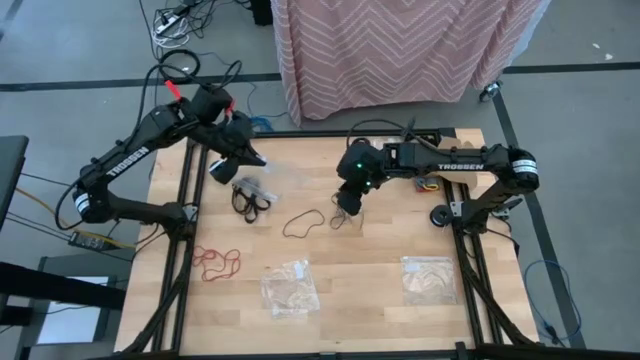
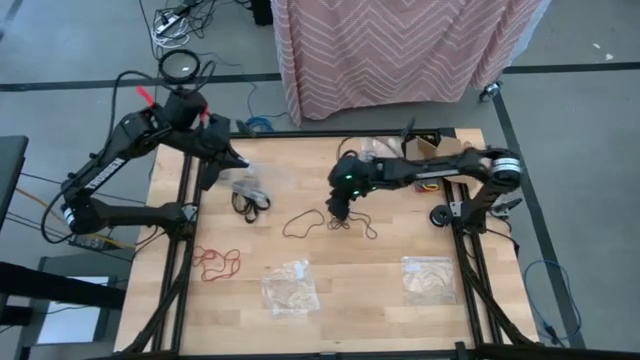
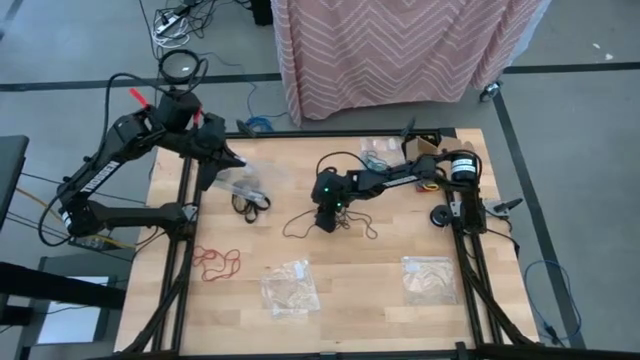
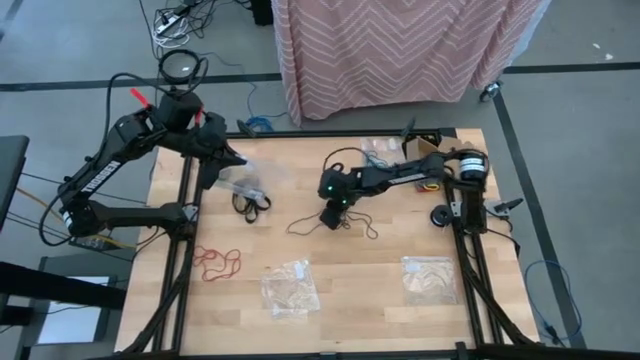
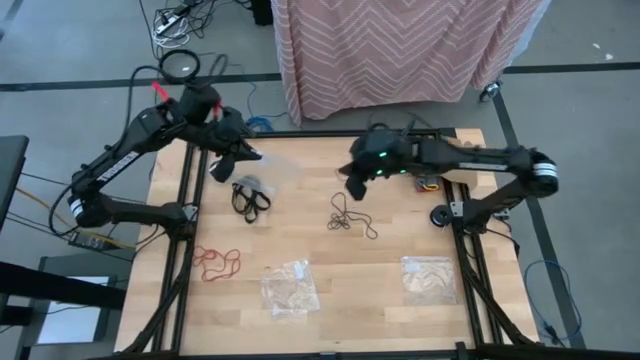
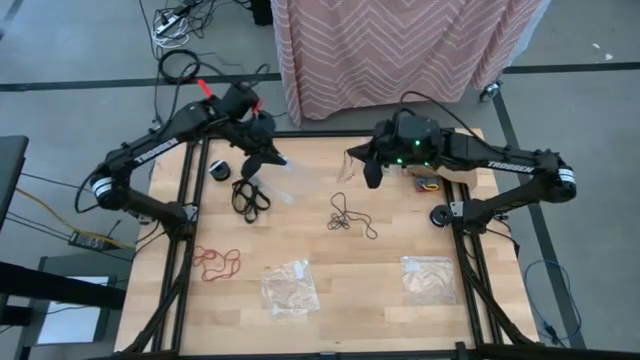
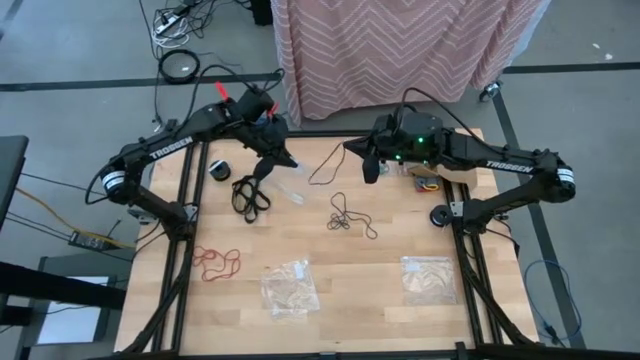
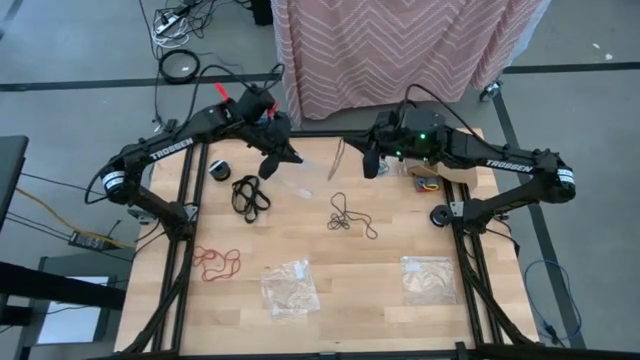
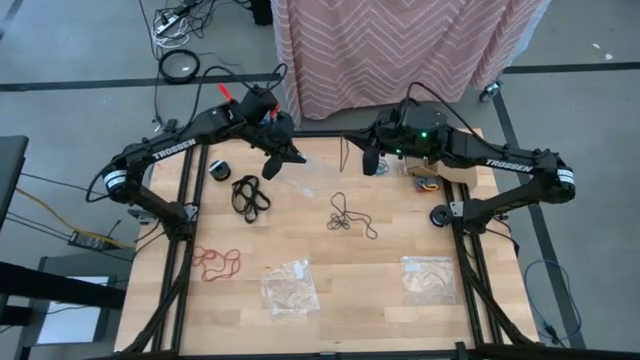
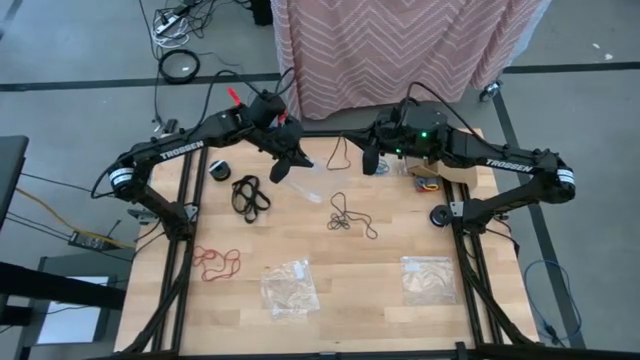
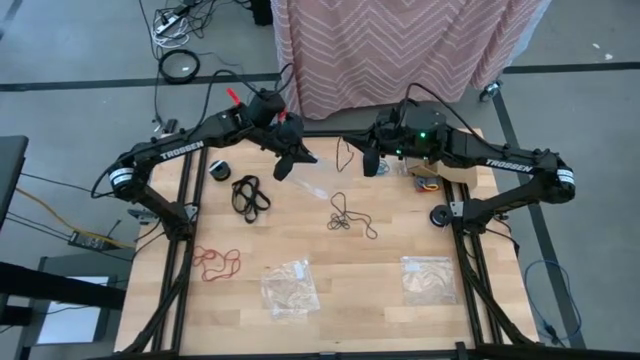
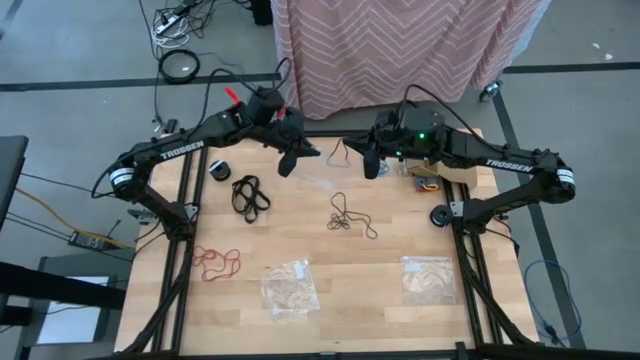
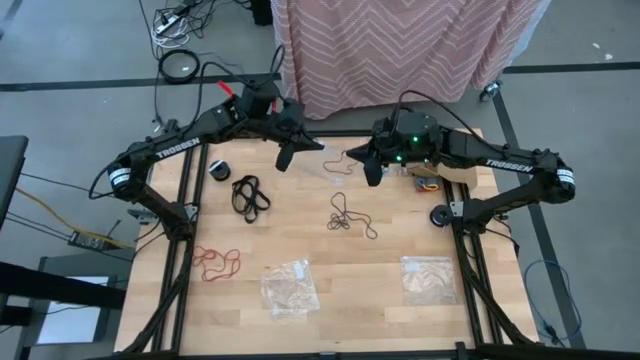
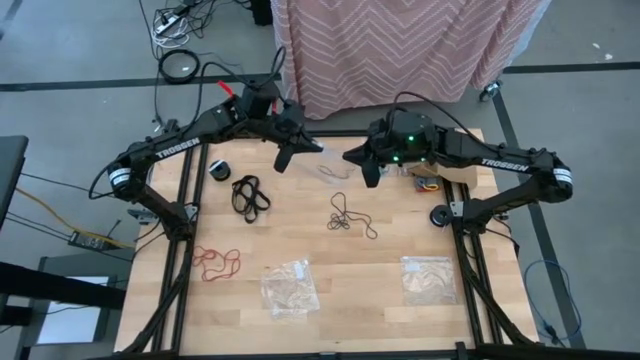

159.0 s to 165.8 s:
Task: Sort rubber bands
Put the black rubber band into the bottom center transparent zip bag

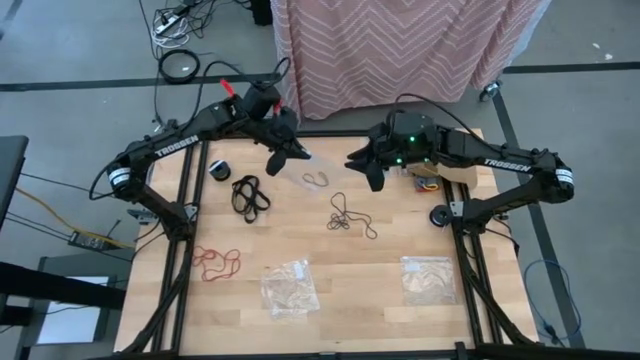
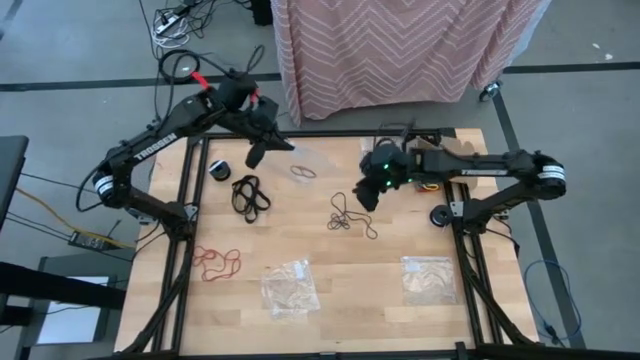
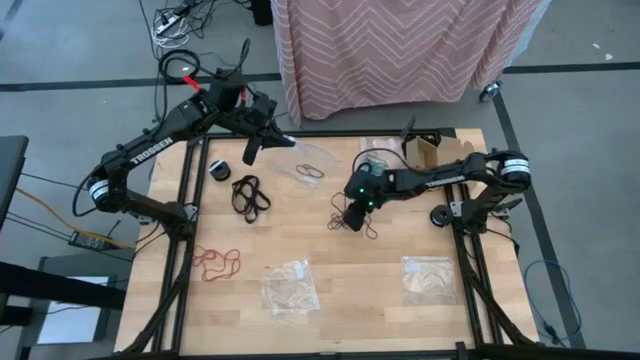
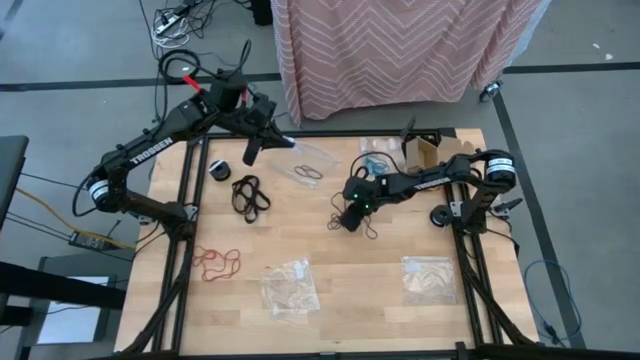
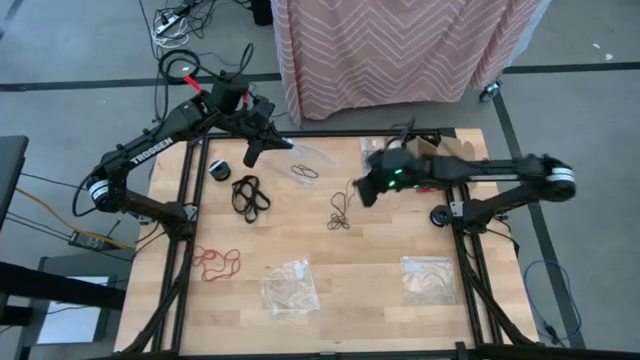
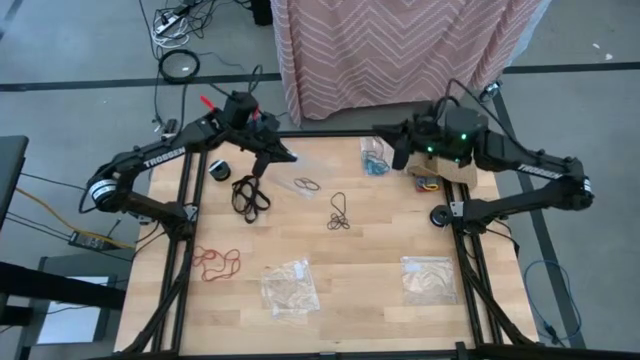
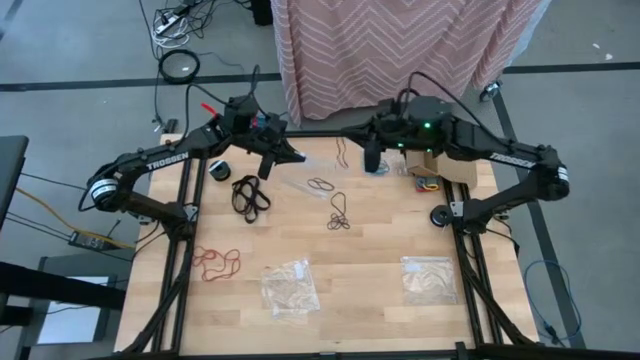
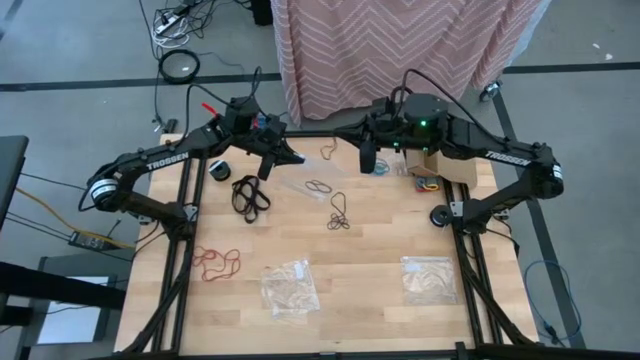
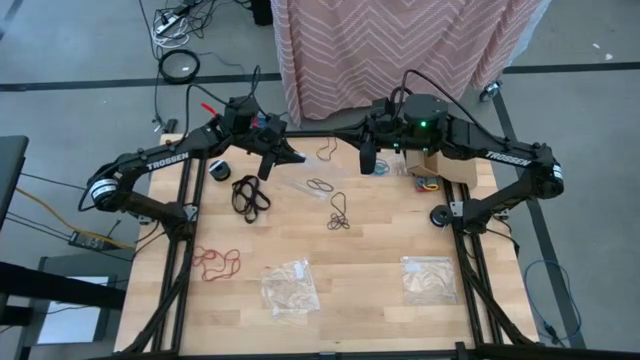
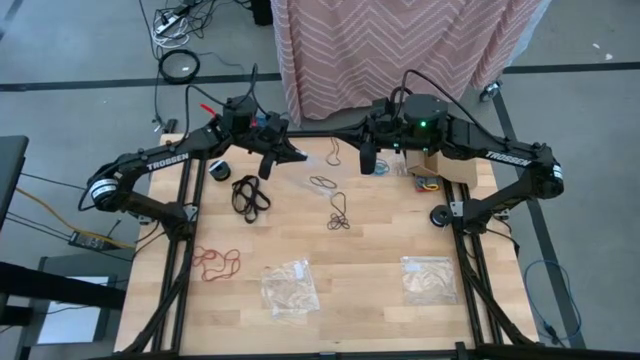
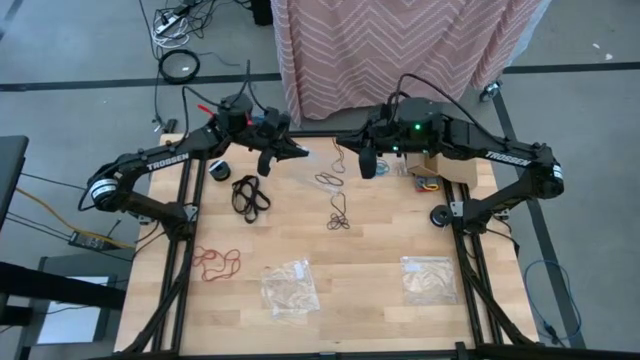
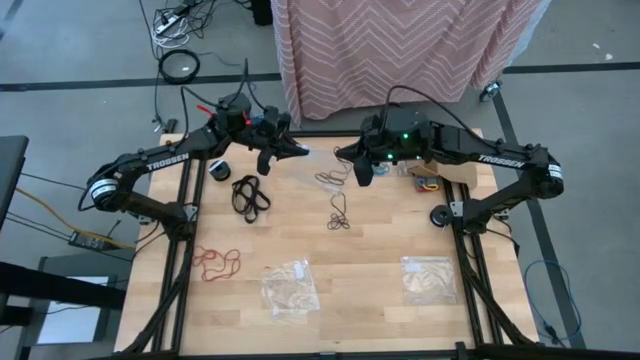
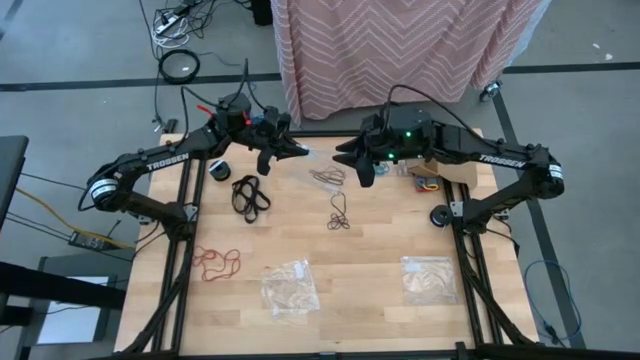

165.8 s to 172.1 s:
Put the black rubber band into the bottom center transparent zip bag

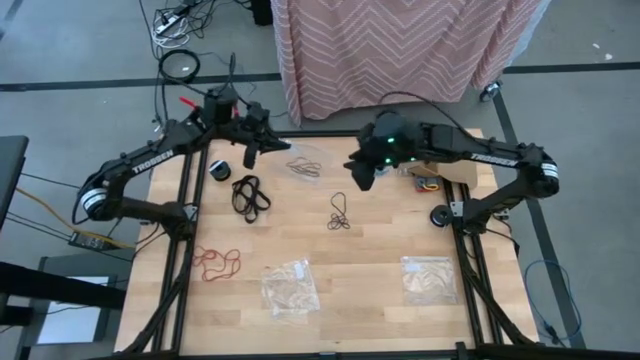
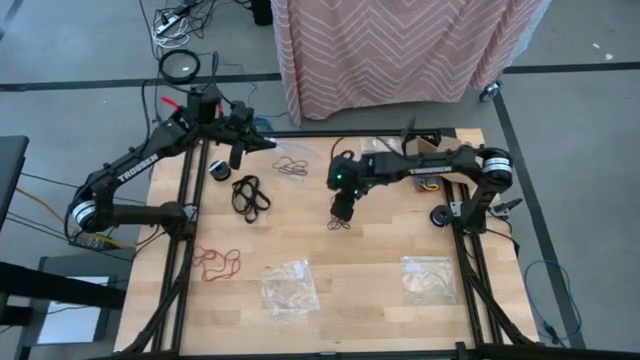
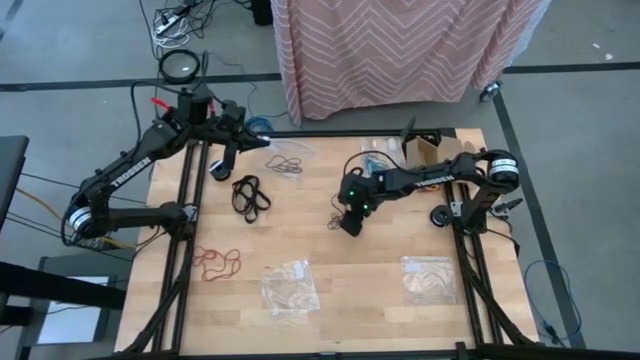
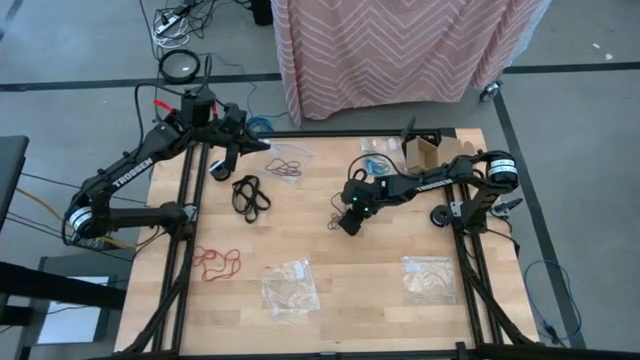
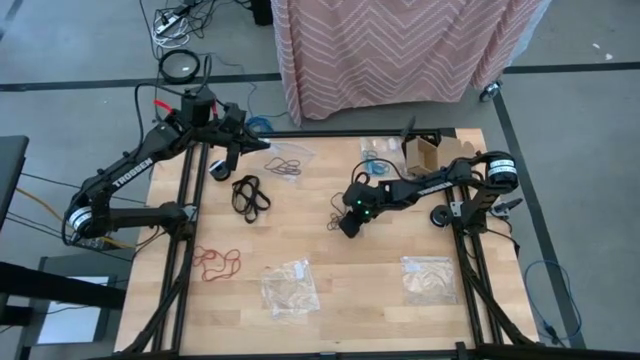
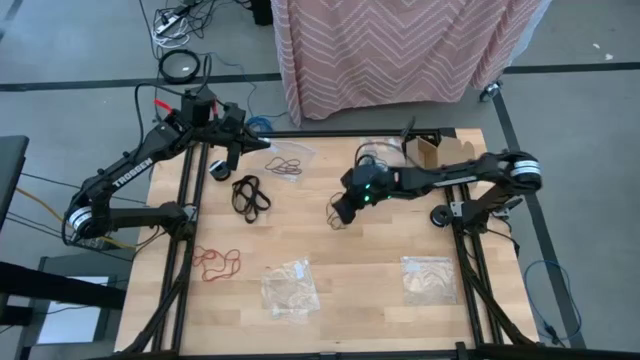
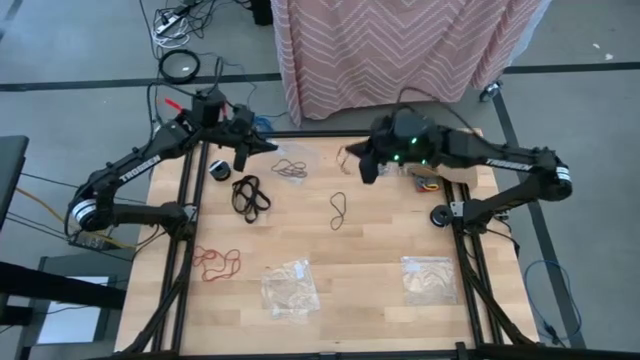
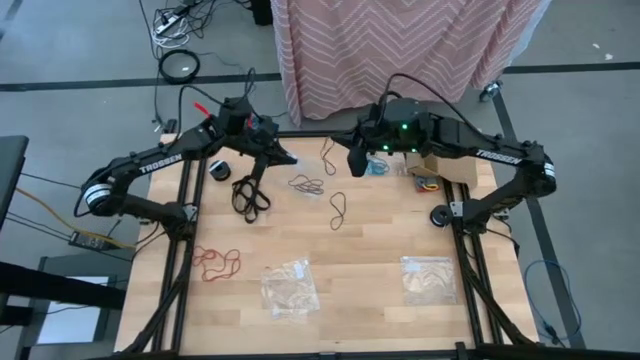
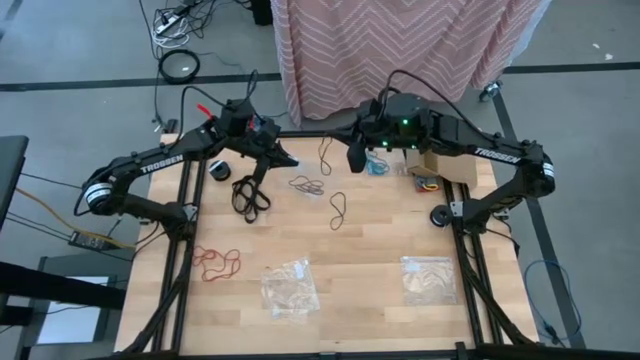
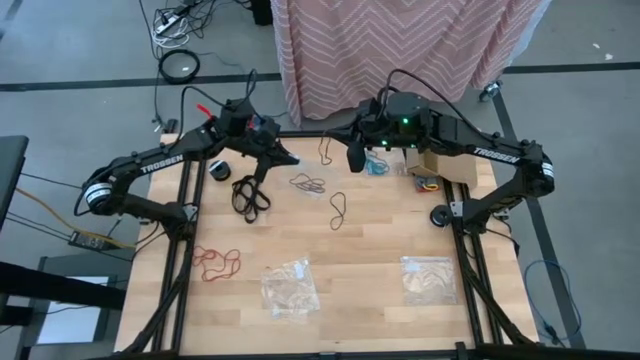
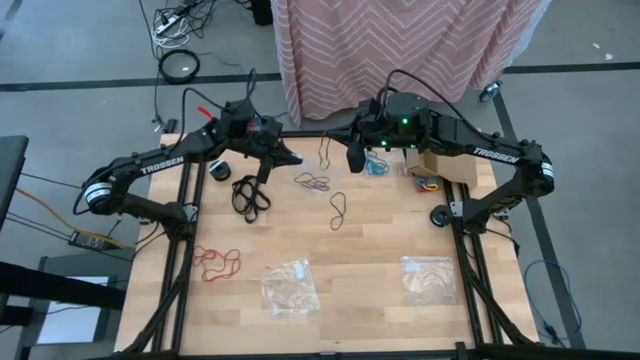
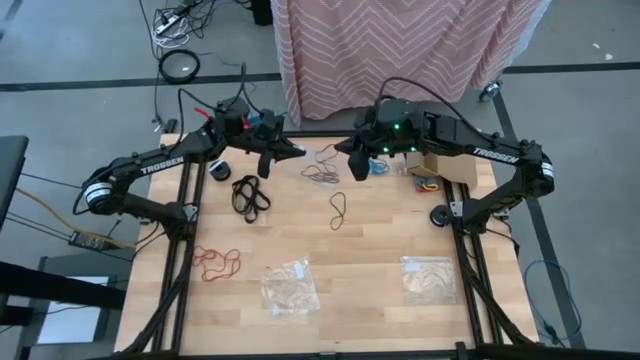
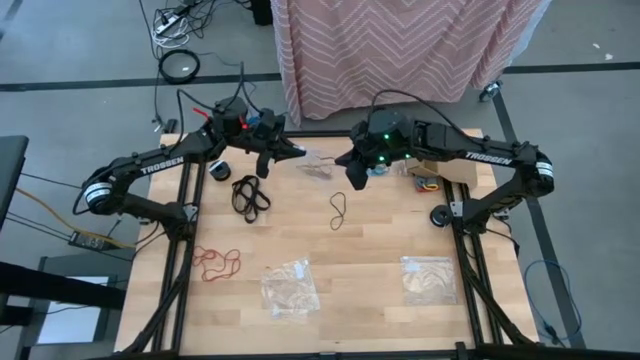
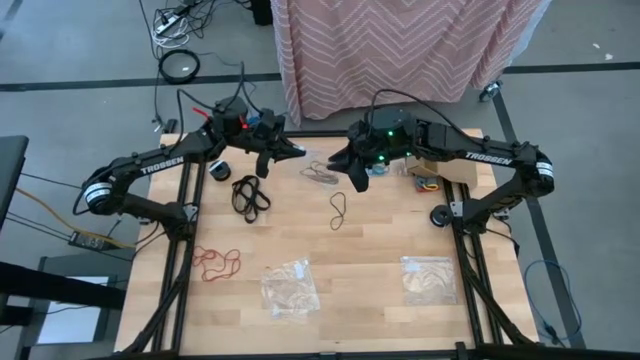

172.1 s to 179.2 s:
Put the black rubber band into the bottom center transparent zip bag

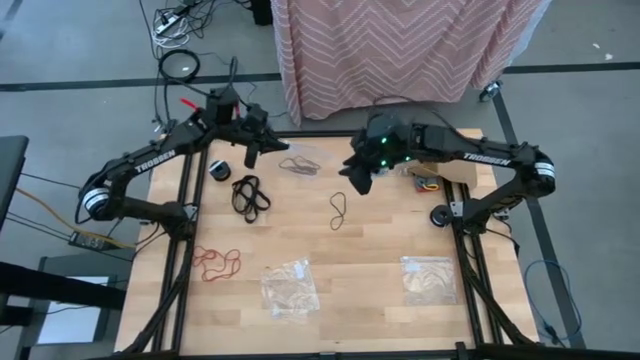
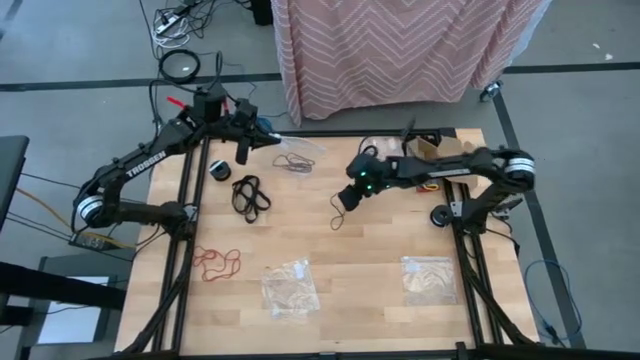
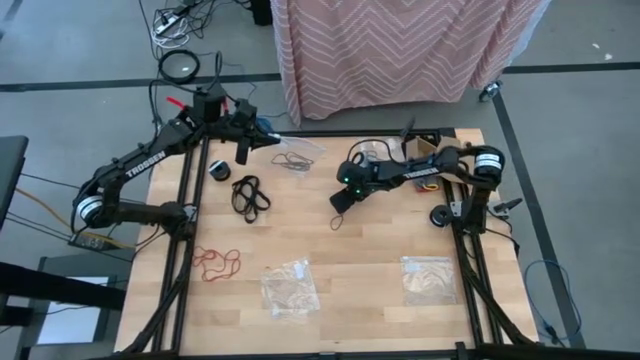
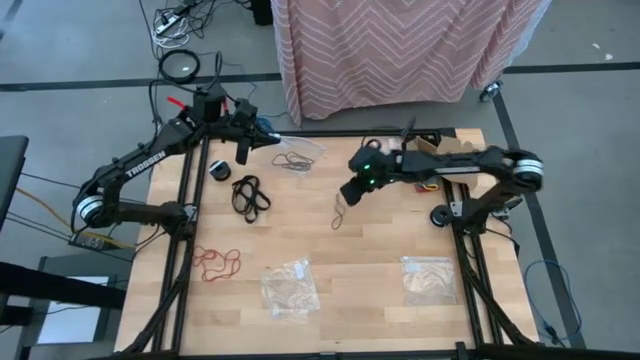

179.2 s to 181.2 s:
Put the black rubber band into the bottom center transparent zip bag
